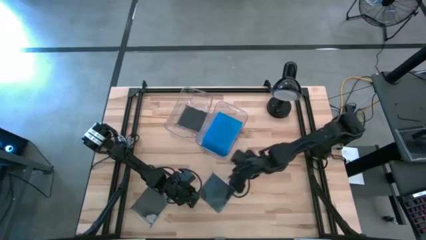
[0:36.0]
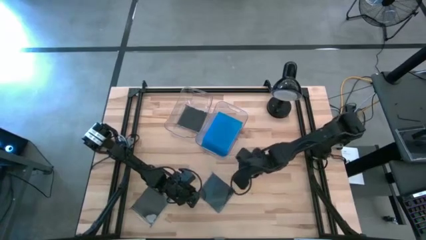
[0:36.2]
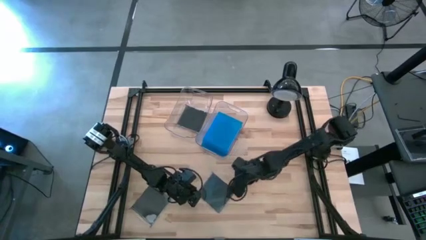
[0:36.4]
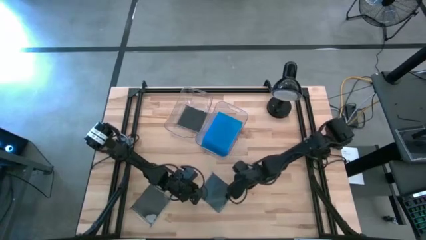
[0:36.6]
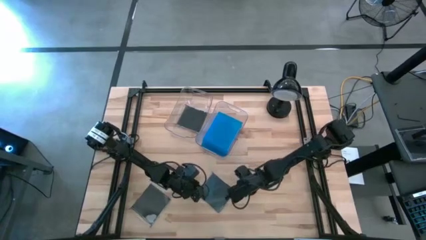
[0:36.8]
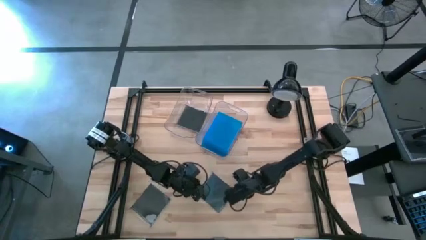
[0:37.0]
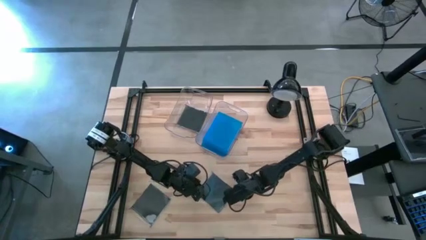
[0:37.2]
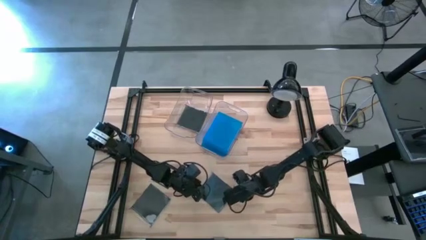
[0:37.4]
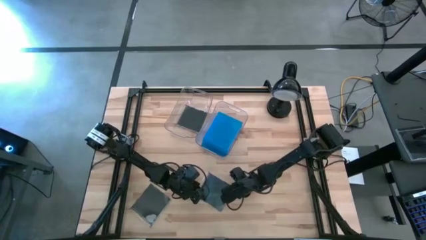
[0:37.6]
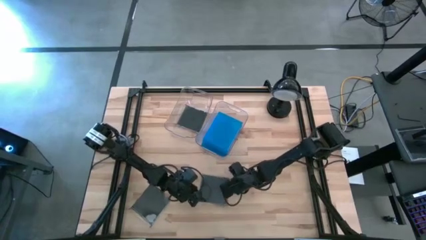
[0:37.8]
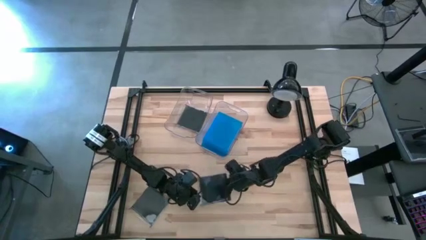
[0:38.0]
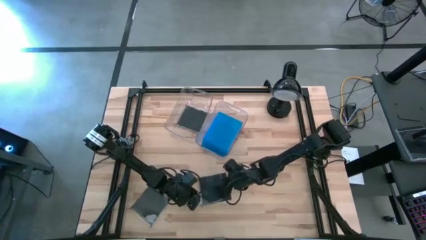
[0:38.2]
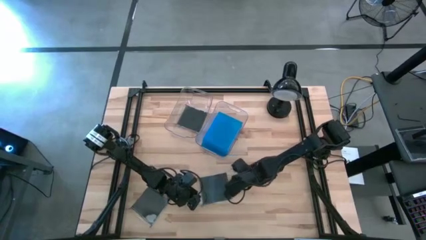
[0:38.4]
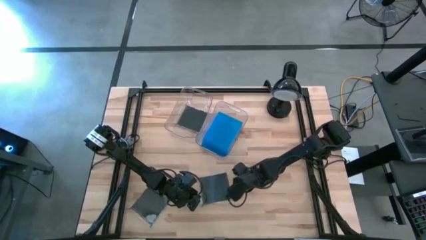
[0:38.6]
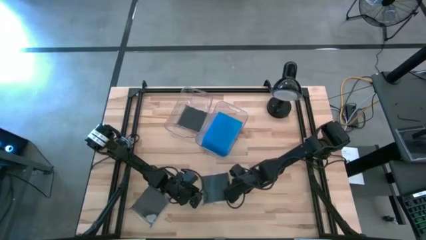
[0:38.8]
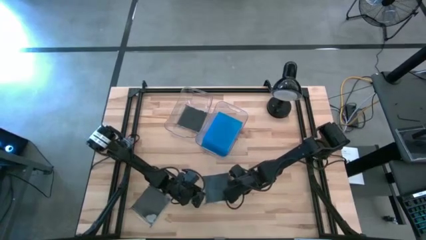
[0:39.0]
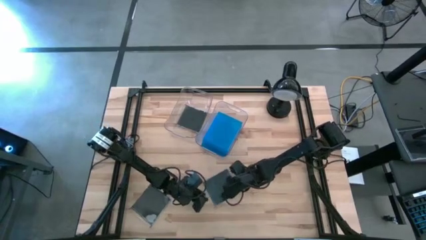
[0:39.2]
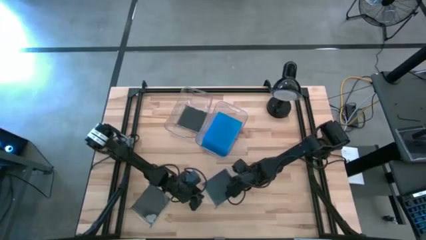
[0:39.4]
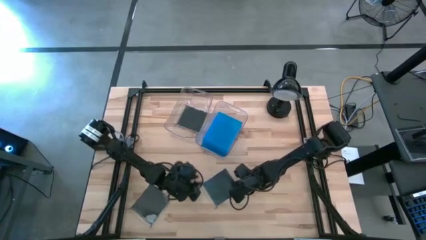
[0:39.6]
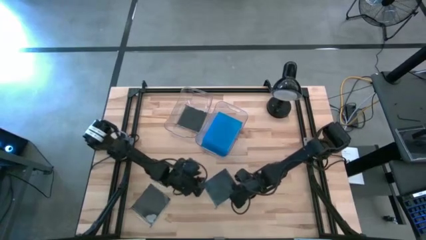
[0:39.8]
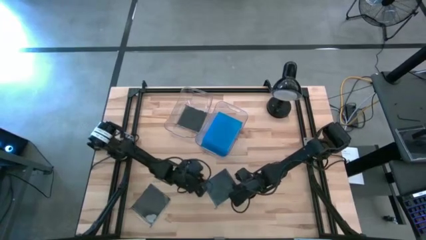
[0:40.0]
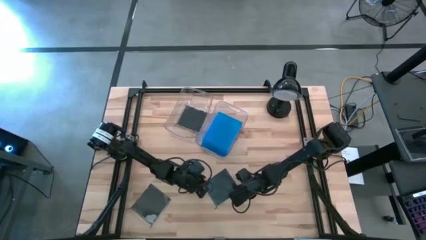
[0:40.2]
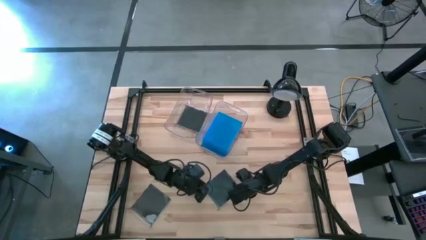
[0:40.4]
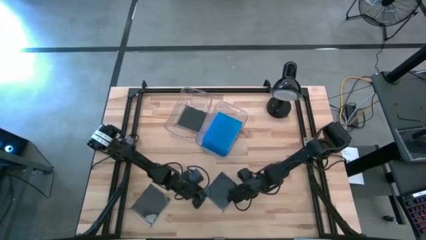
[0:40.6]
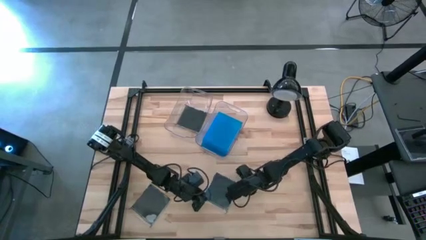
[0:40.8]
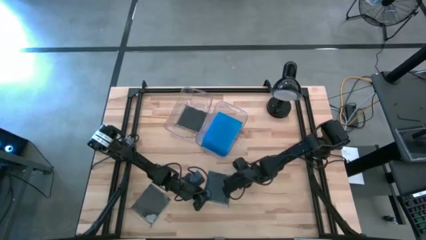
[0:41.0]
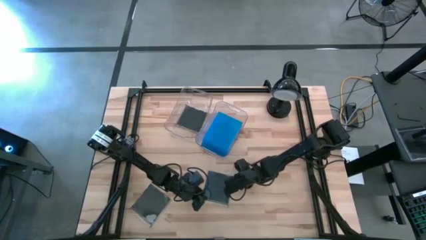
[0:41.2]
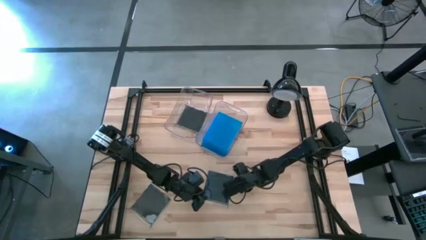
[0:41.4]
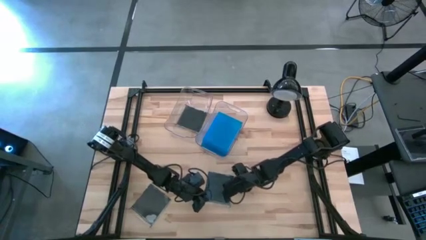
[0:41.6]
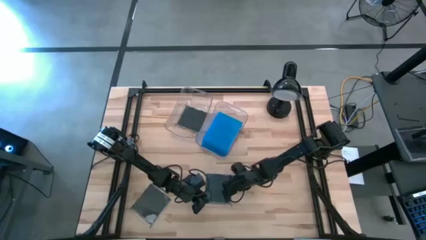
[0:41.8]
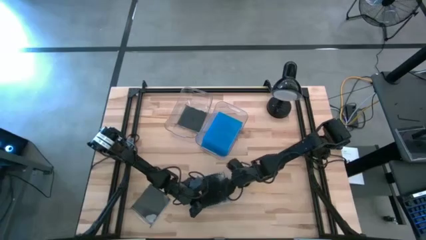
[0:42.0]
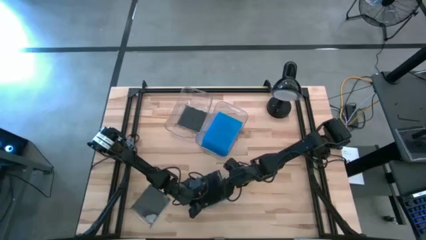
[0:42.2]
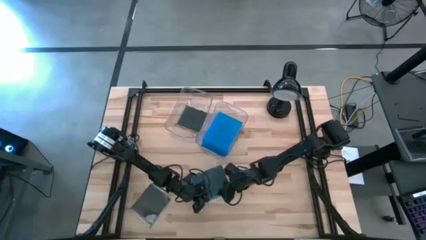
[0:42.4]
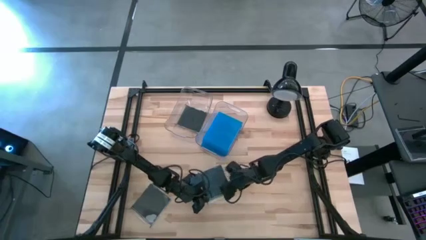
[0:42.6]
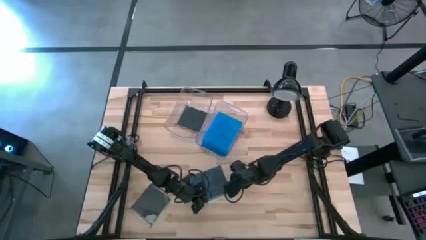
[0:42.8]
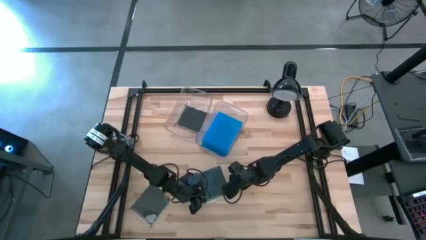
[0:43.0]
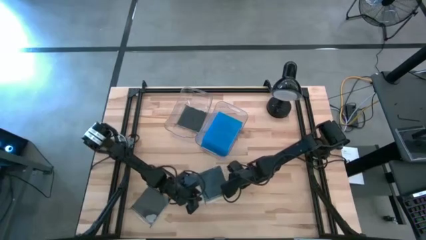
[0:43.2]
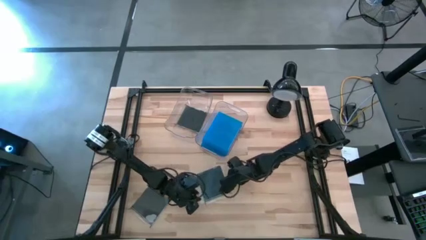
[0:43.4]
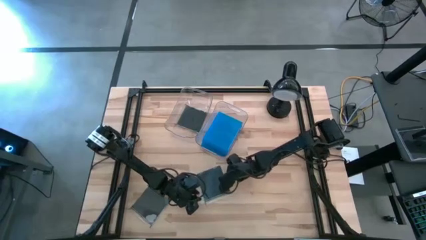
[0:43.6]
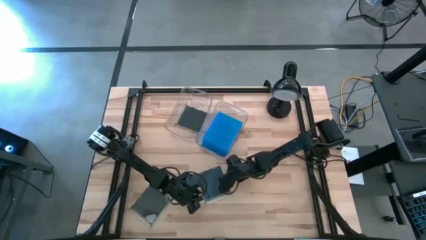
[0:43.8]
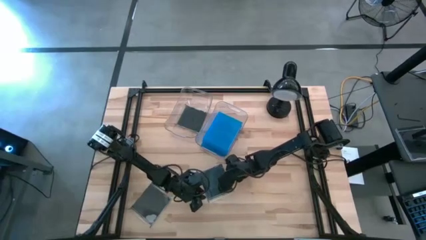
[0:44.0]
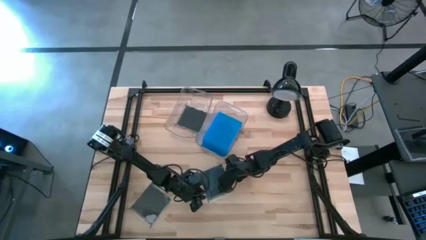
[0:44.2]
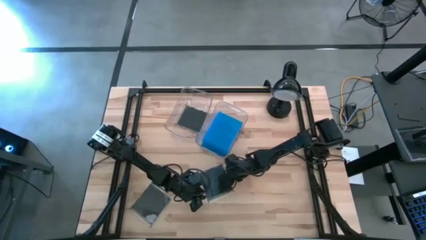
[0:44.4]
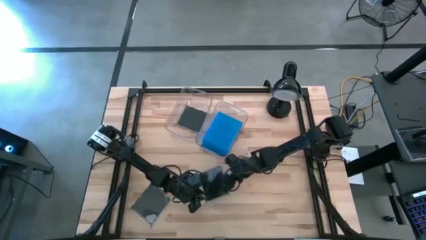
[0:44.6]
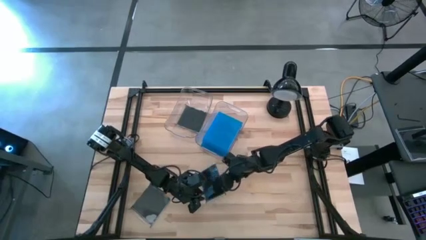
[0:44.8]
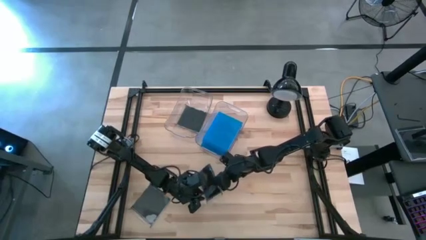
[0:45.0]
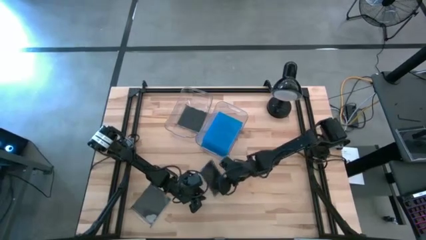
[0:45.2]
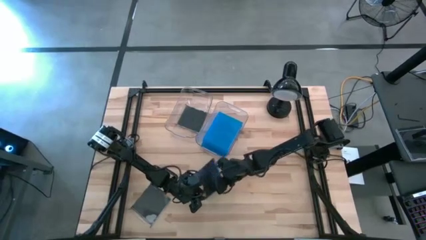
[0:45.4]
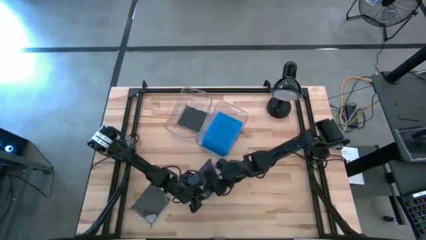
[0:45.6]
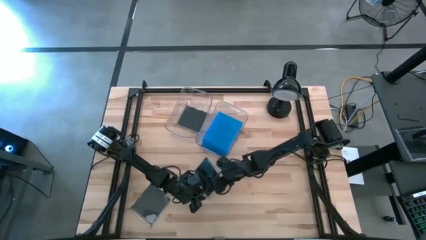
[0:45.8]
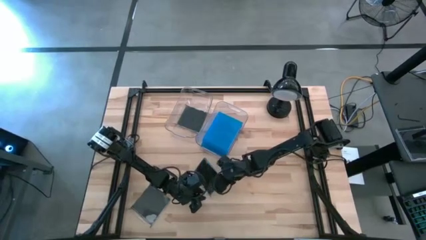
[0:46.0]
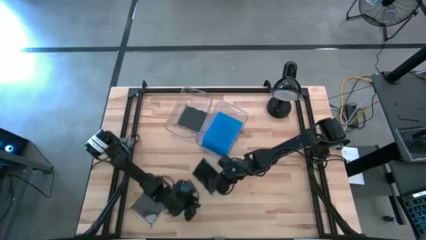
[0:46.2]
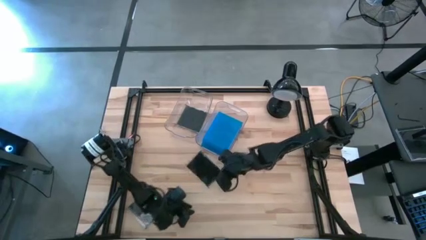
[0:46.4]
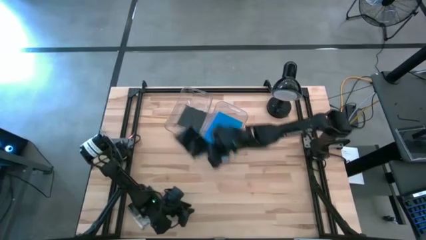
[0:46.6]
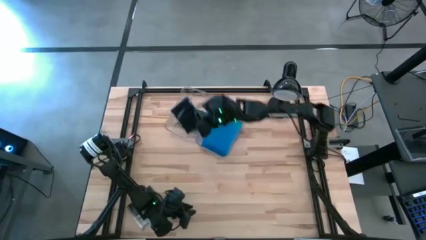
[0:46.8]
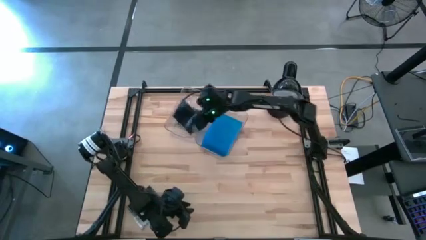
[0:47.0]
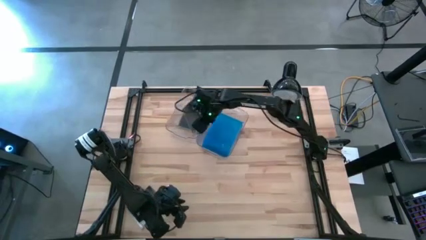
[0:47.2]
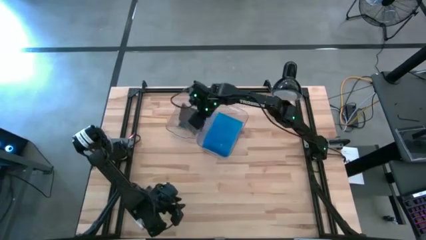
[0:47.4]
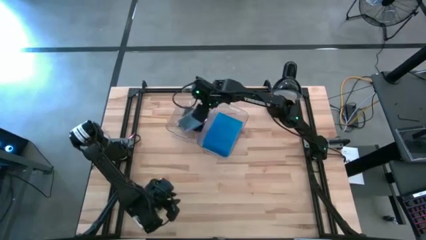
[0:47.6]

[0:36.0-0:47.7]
Task: Pick & place jewel cases by type
Put the right black CD case into the left transparent bin

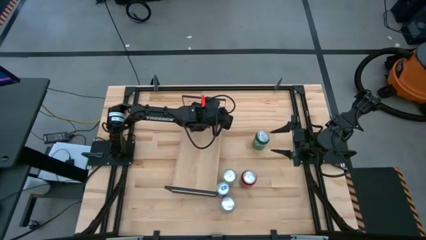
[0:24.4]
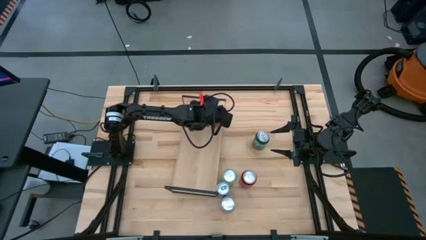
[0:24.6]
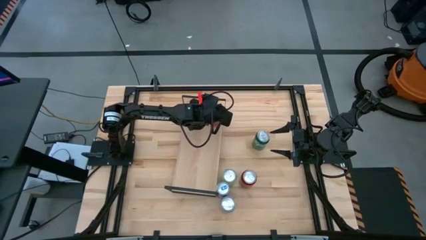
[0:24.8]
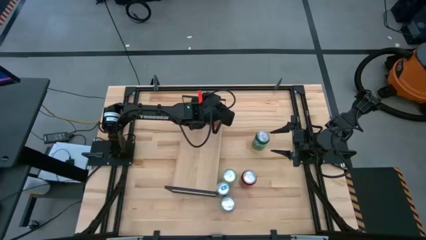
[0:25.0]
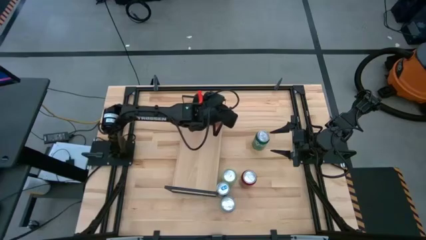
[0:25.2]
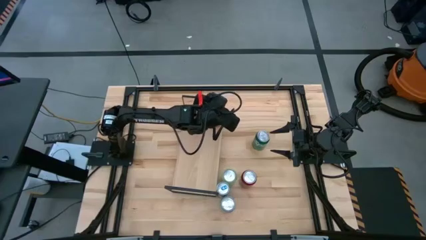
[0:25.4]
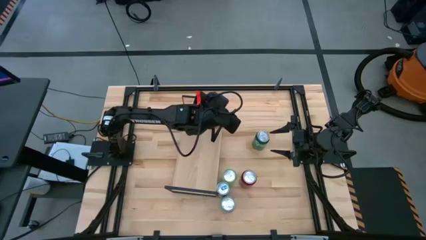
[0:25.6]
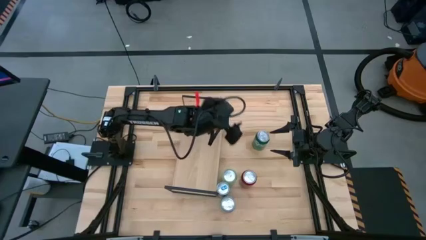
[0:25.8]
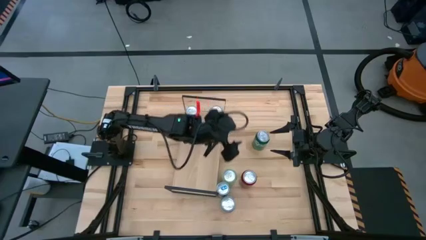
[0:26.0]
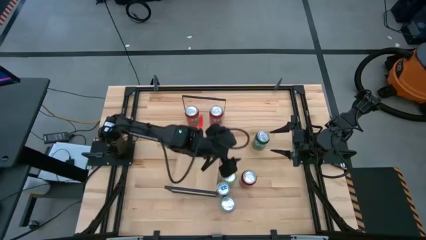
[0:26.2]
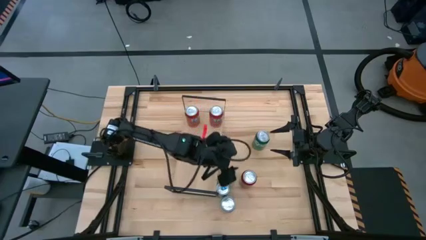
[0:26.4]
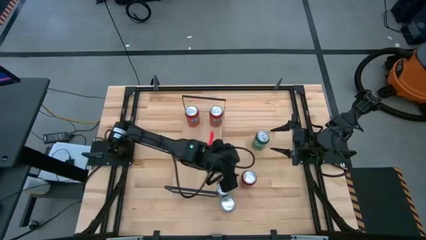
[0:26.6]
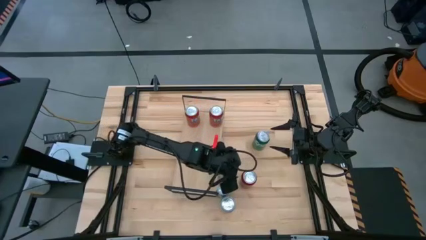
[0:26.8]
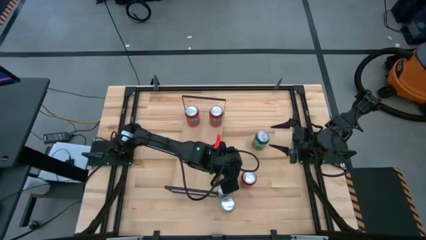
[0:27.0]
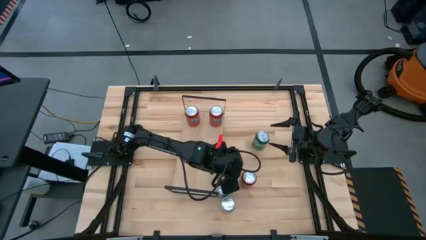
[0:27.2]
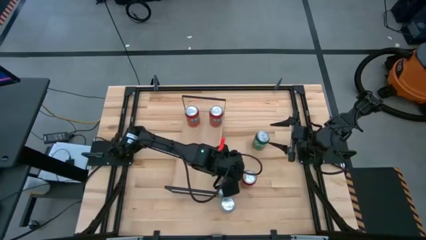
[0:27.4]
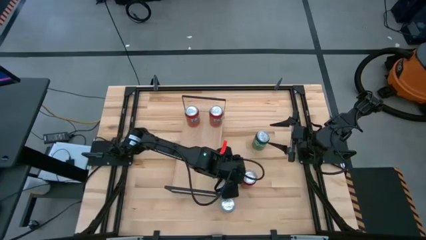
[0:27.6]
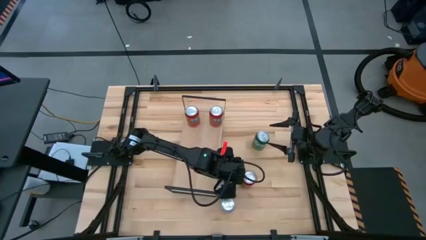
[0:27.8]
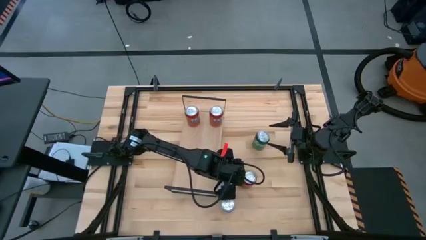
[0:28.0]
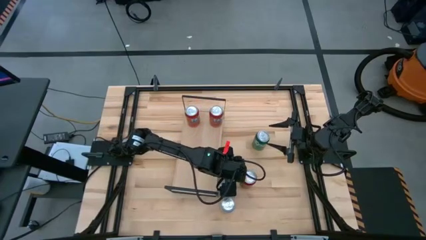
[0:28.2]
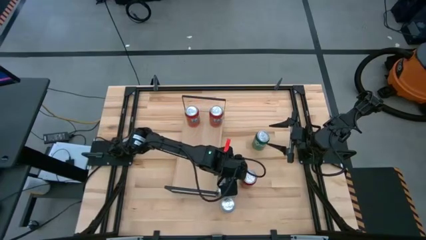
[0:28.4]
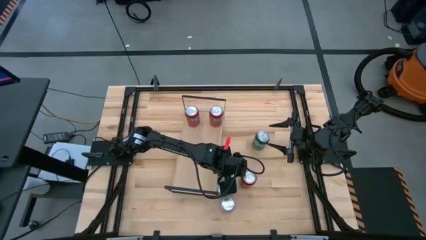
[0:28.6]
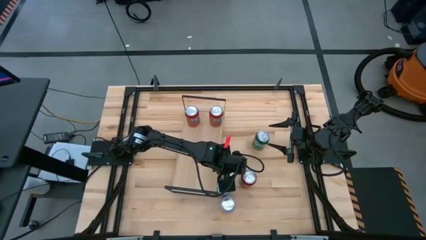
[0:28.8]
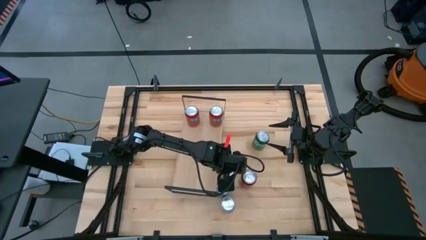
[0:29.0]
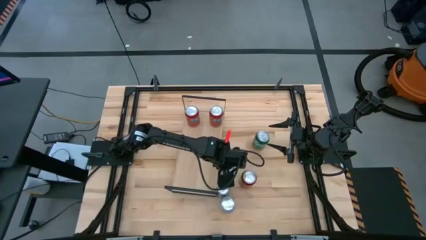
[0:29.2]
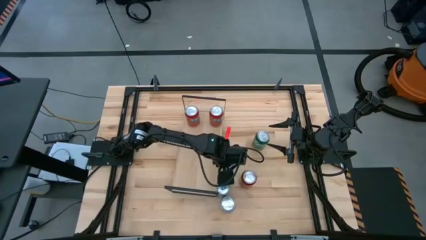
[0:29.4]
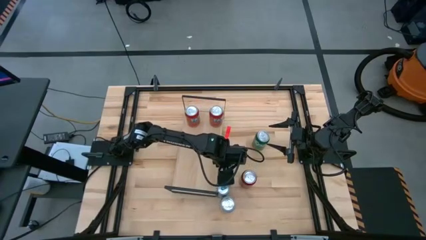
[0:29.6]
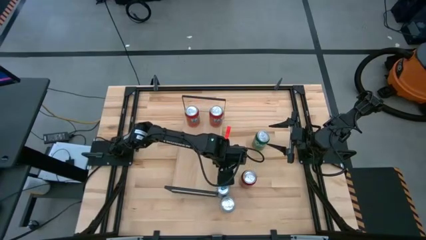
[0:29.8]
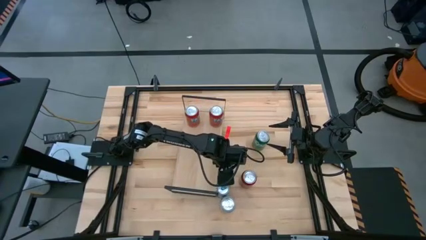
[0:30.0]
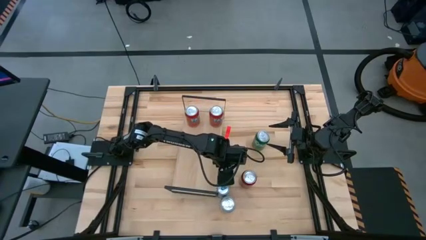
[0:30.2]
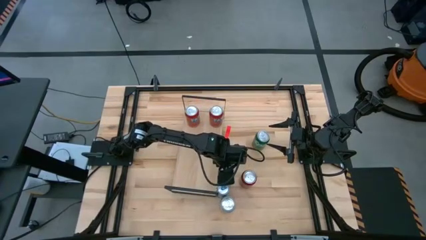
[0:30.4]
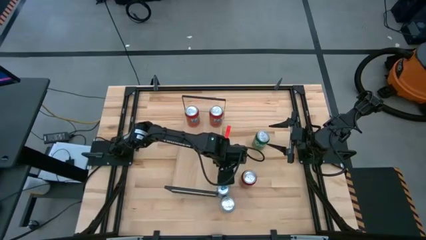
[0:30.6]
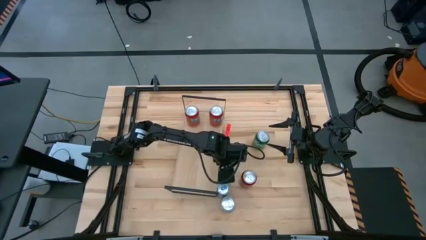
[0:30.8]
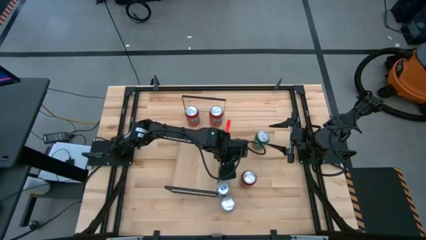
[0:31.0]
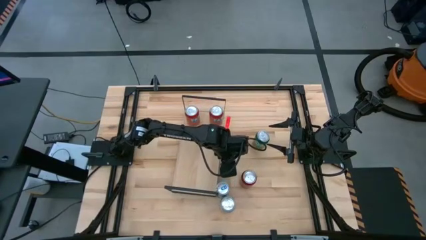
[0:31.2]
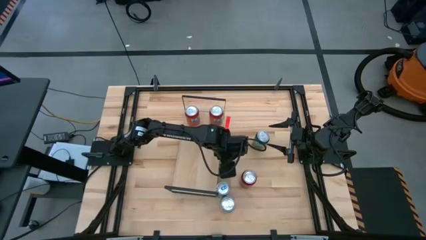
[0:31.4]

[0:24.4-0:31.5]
Task: Place canned beverage on shelf
Put the light green soda can on the shelf
